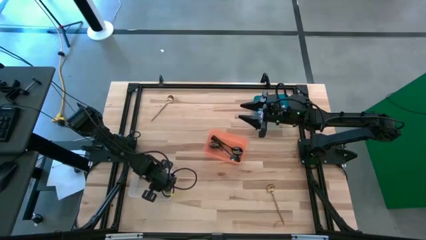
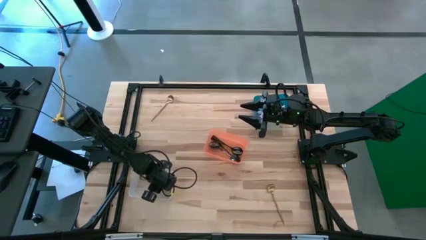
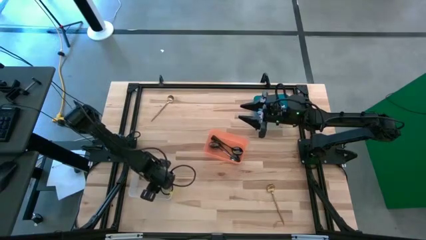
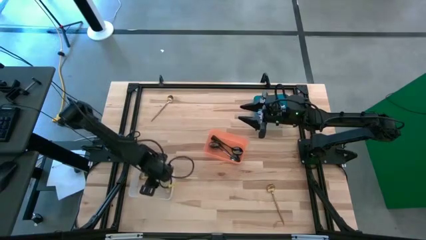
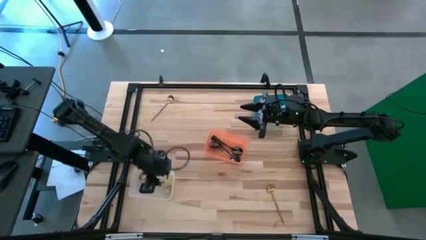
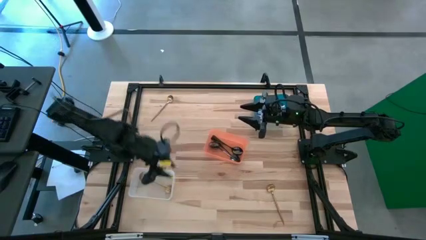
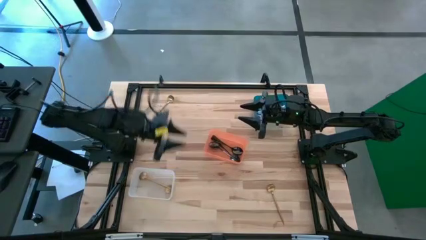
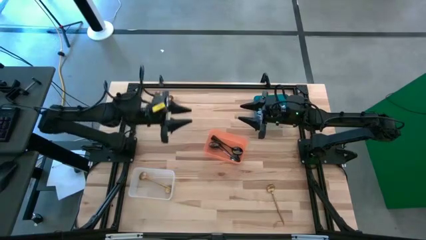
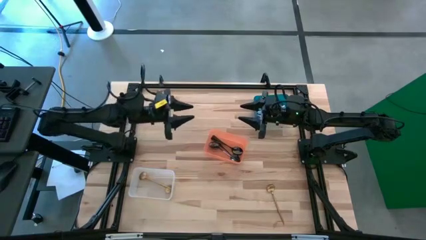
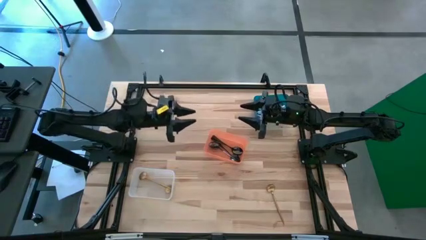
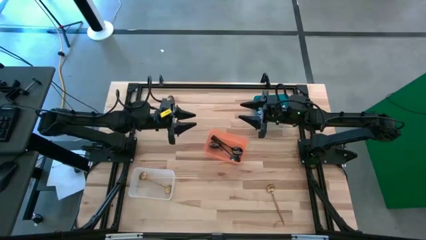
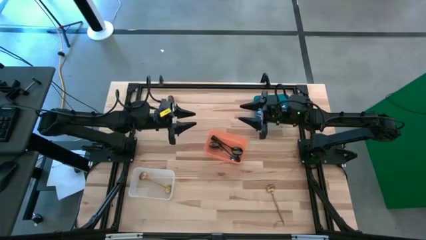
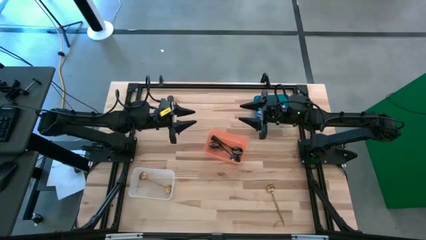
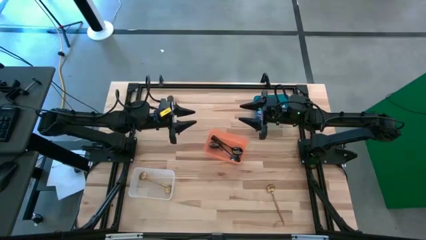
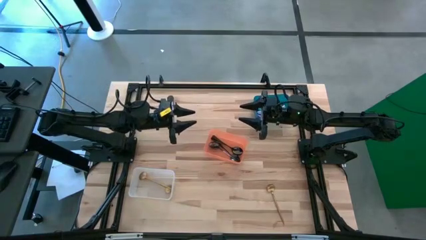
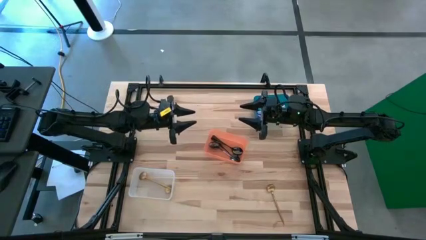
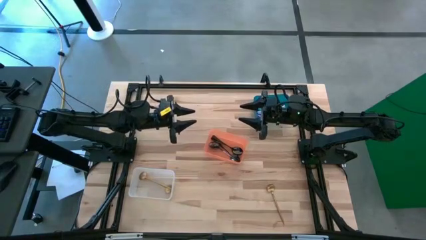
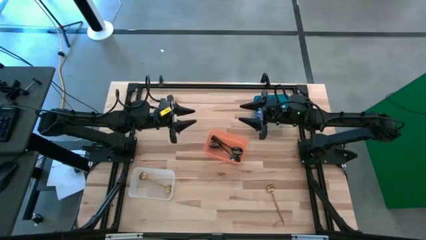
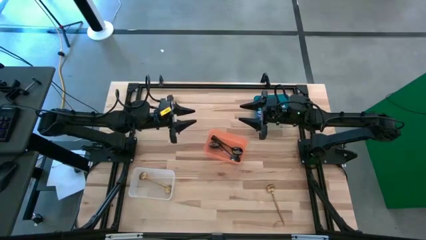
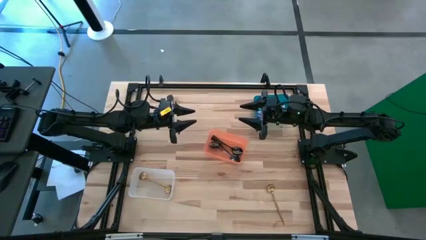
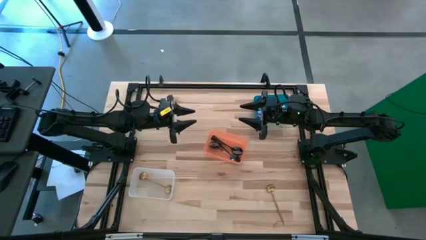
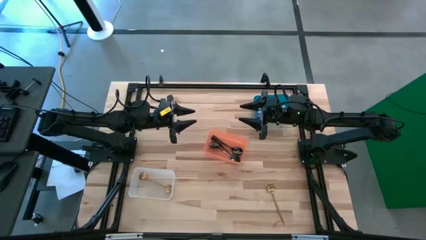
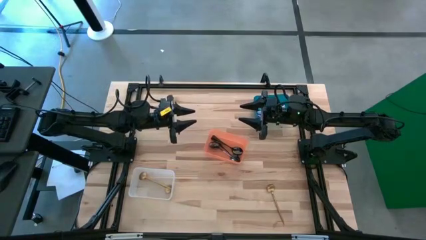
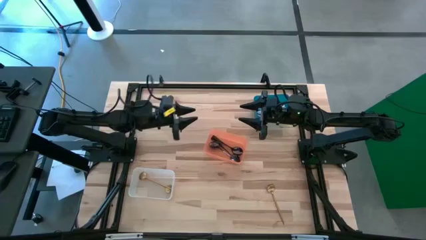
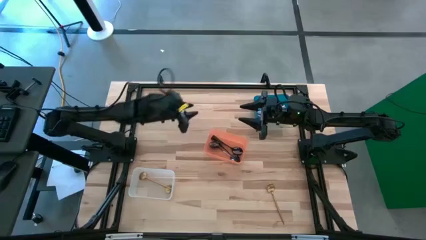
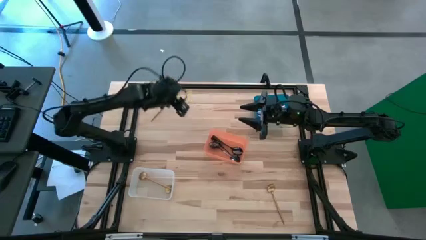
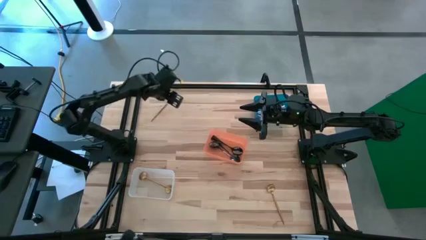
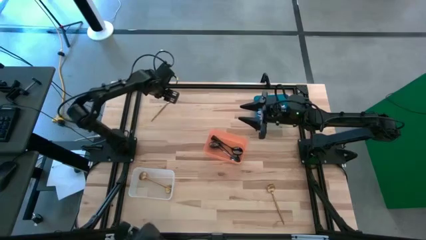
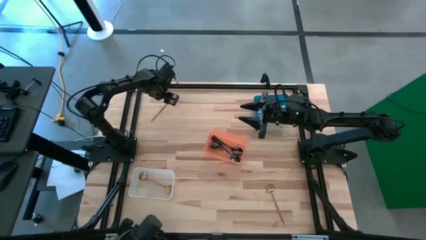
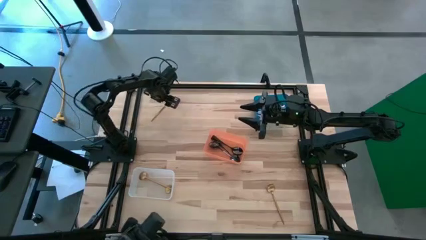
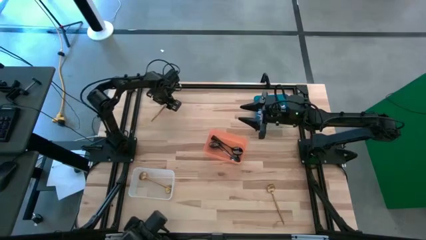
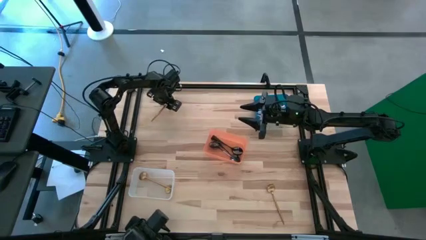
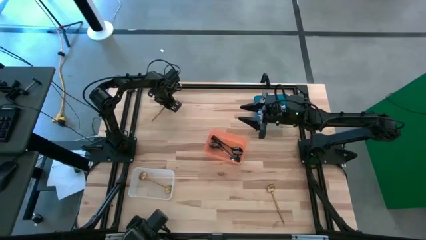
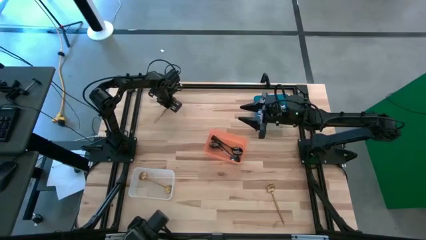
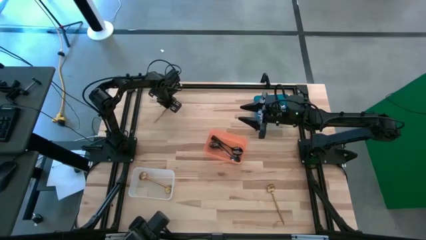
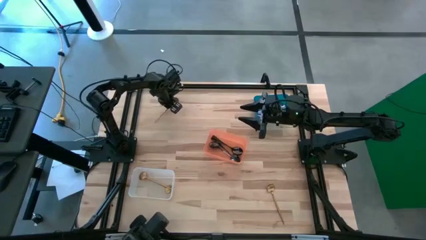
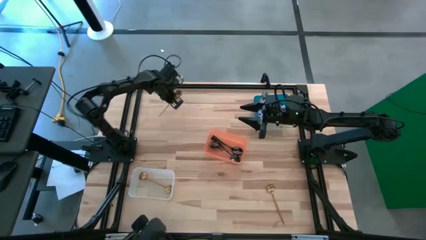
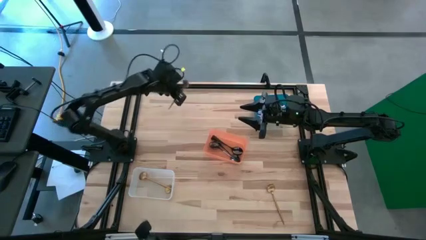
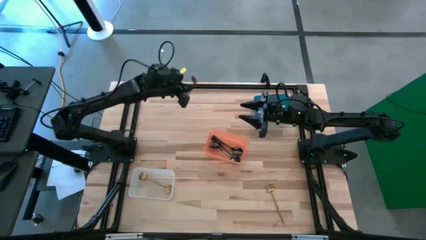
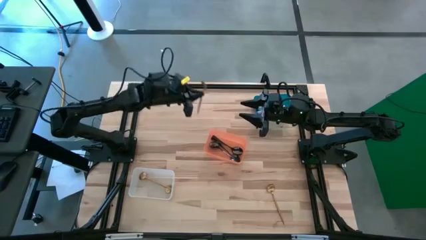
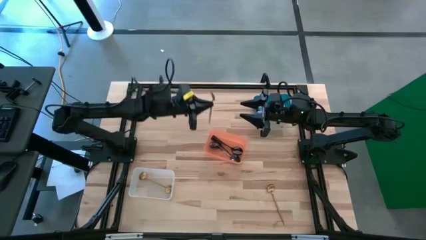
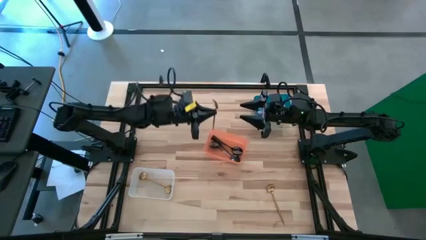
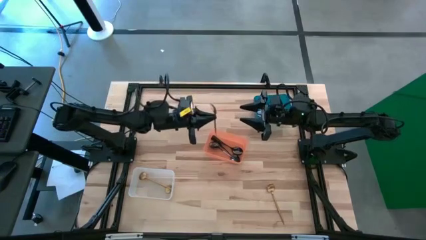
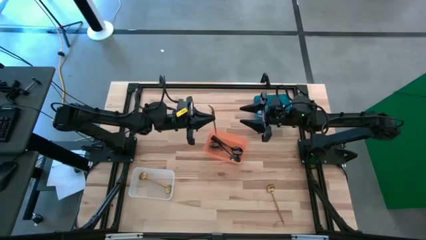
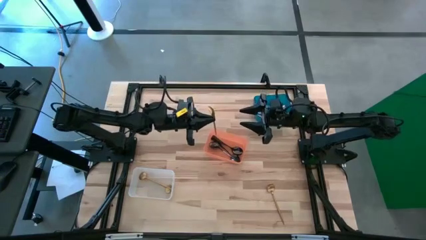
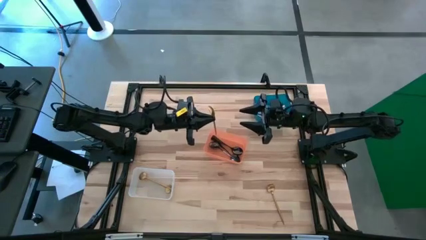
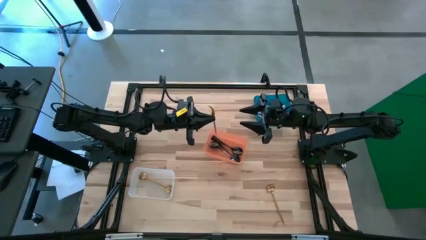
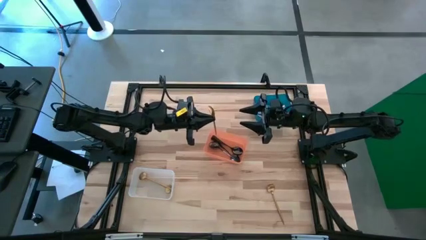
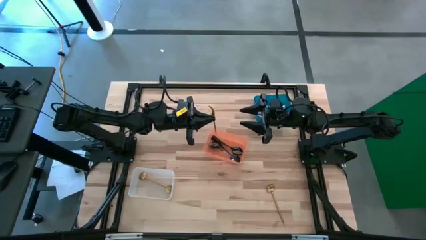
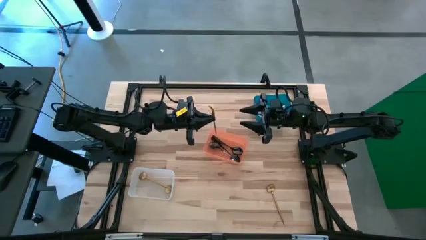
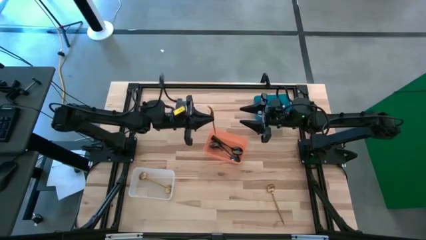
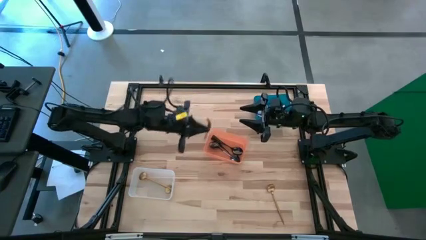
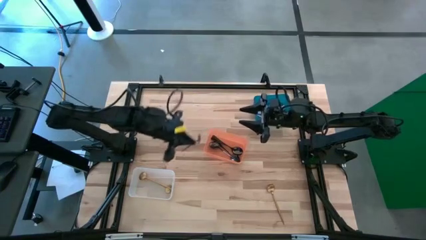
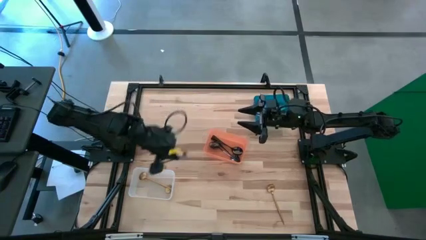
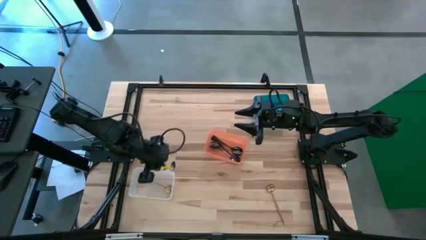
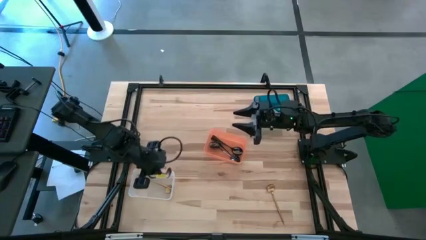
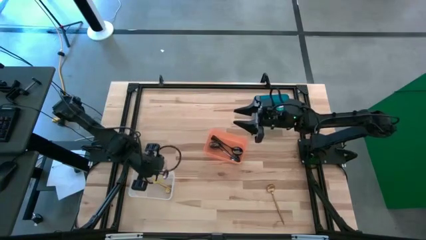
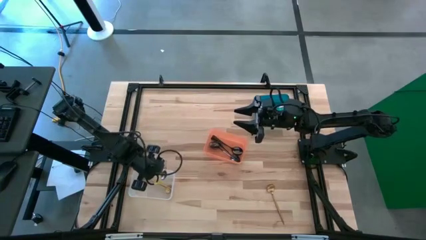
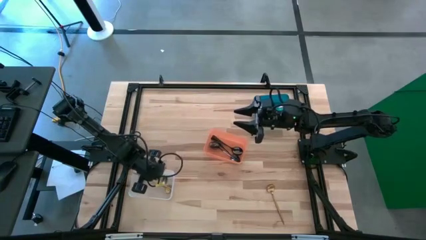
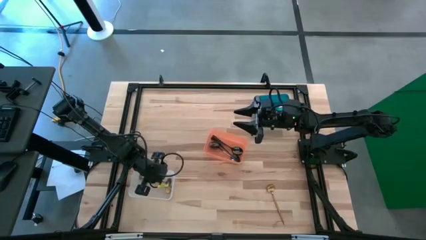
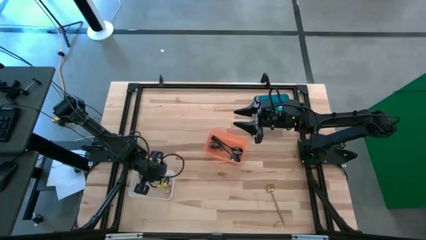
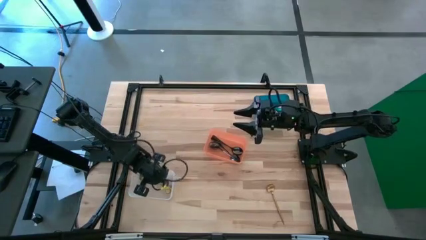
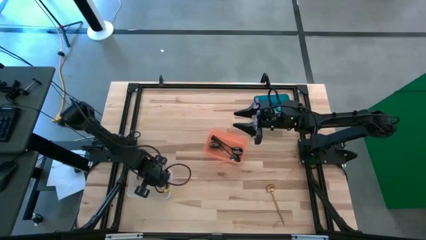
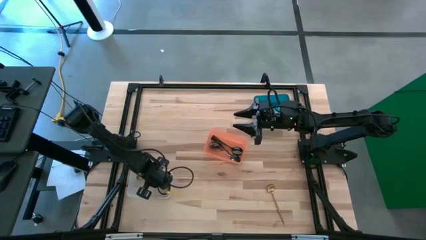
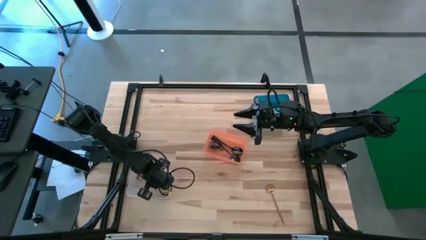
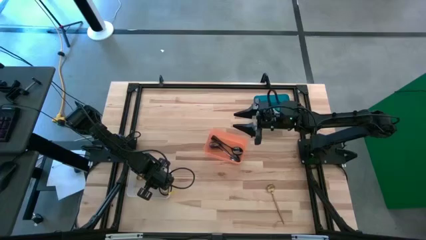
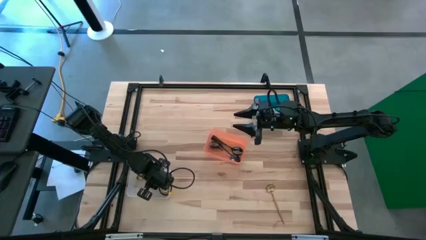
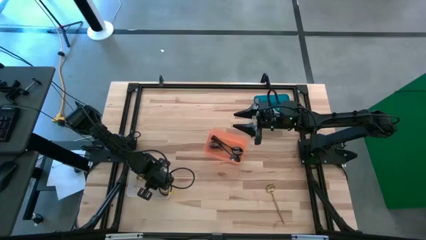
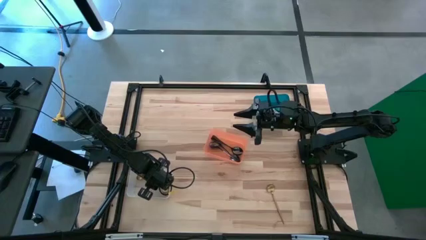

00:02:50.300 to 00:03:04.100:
Task: Sort silverware by color (type)
Put the top golden spoon into the white bin

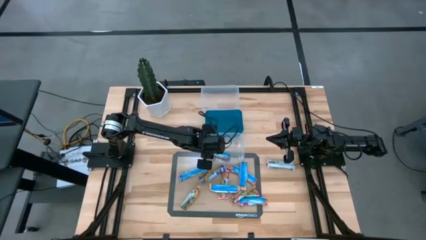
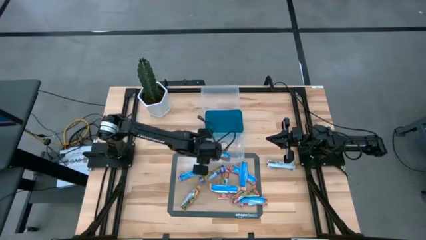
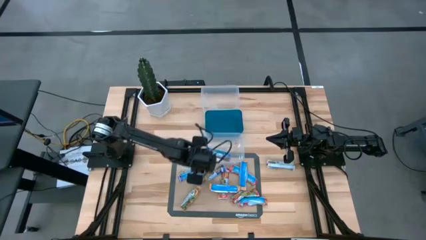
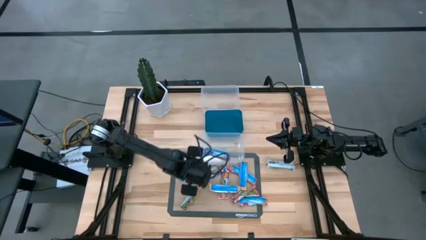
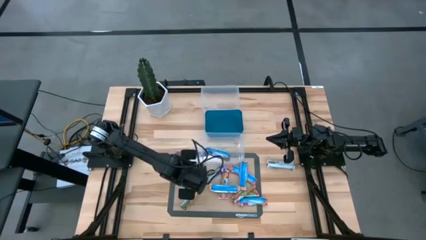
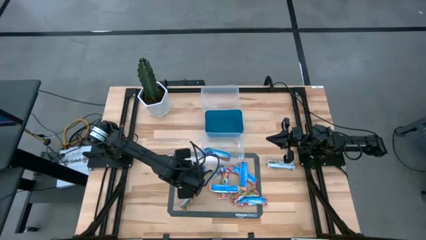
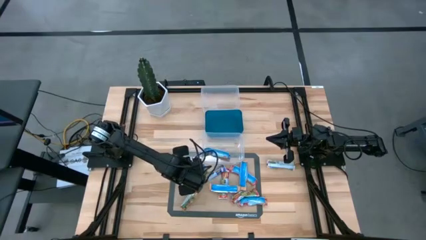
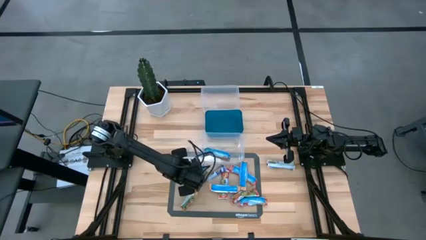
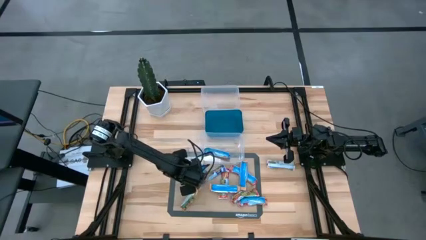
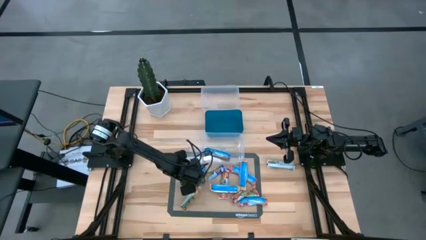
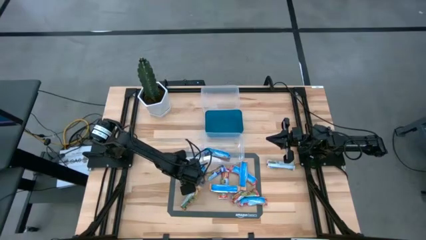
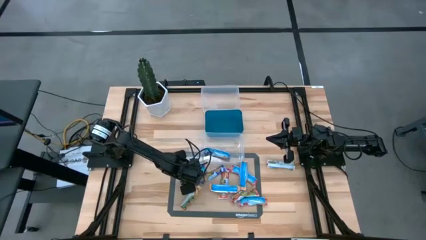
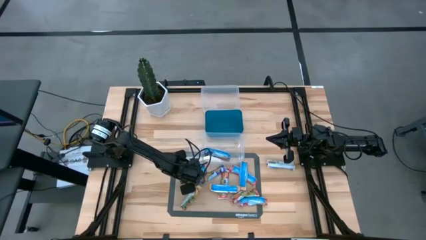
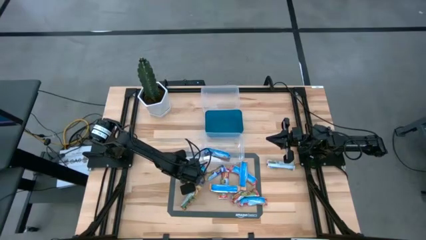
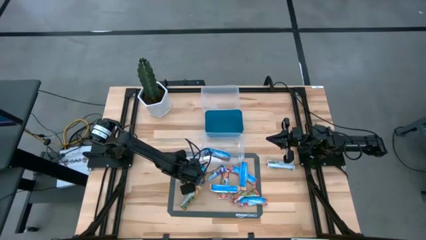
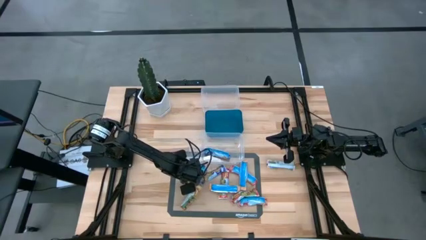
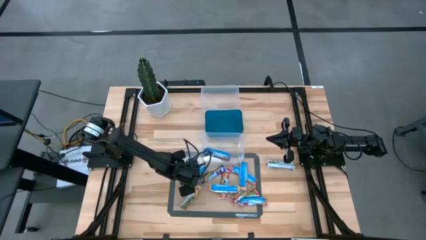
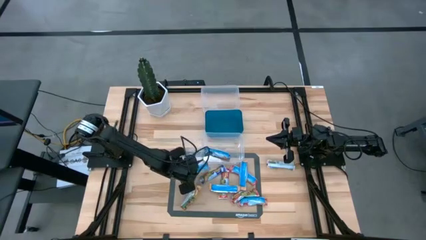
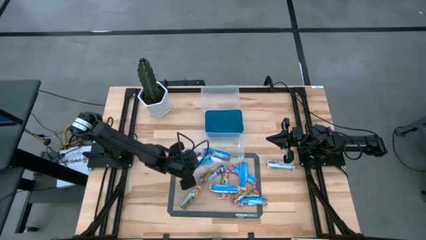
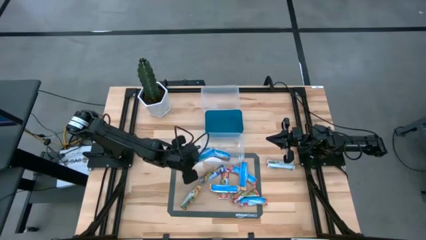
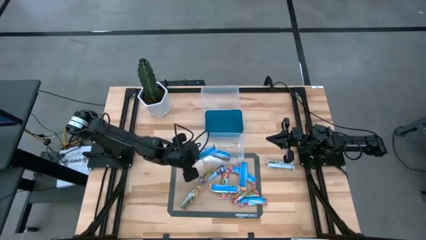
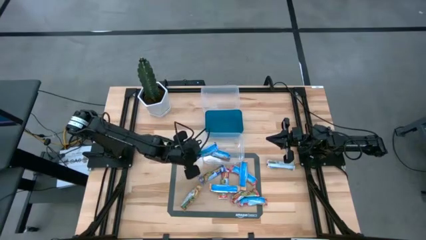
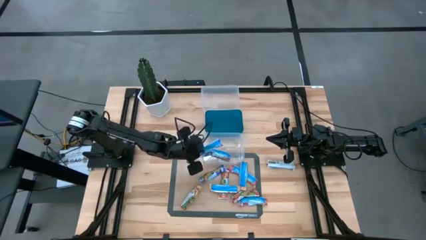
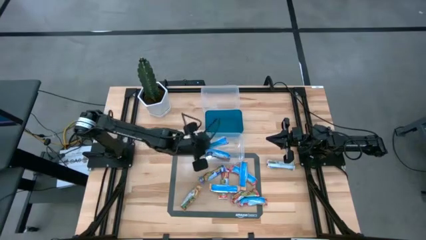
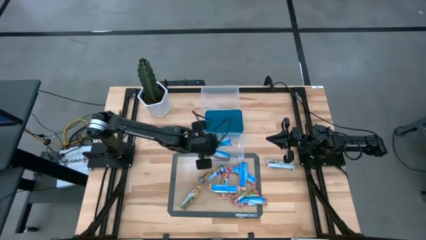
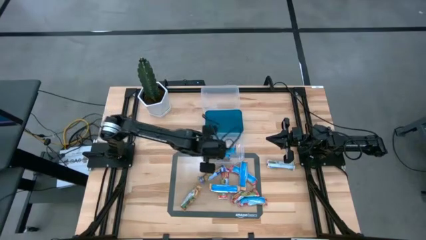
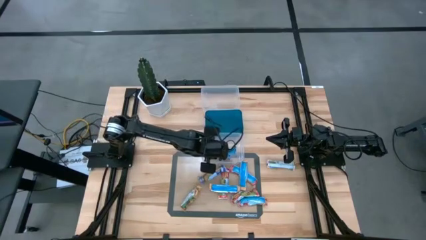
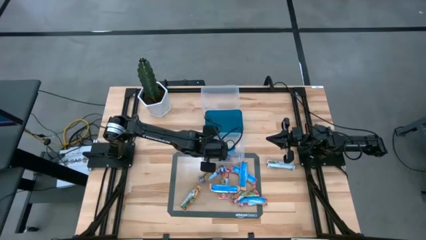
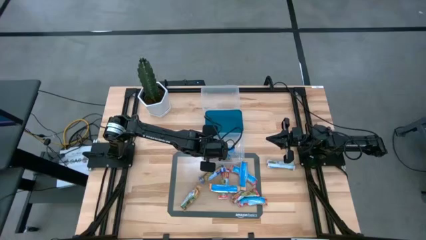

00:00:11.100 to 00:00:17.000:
Task: Pick and place Granola Bars by type
Put the blue granola bar into the bottom transparent bin
